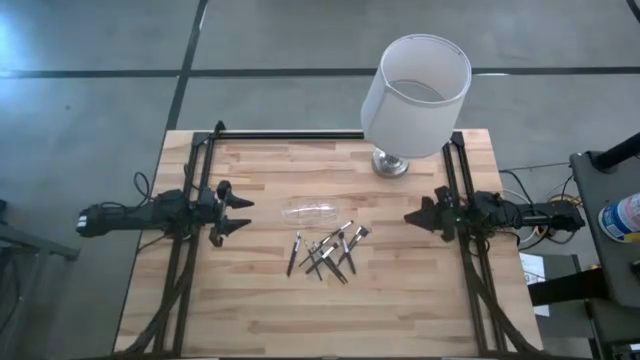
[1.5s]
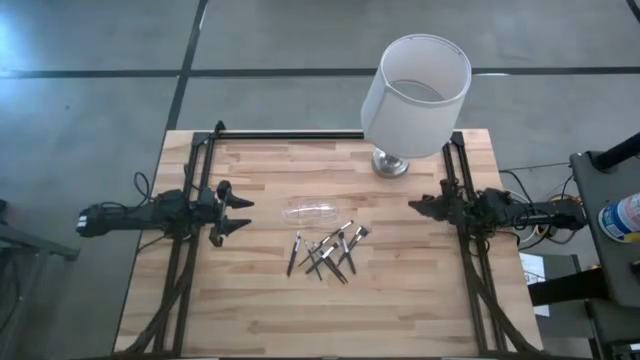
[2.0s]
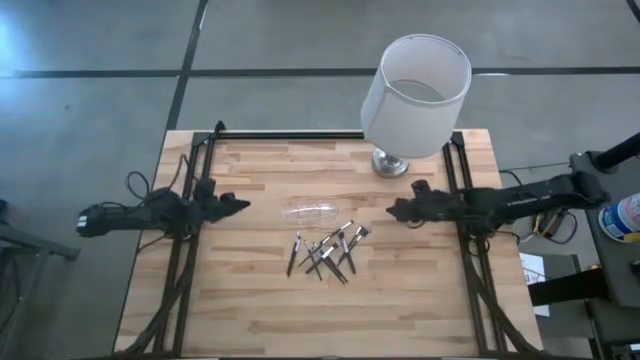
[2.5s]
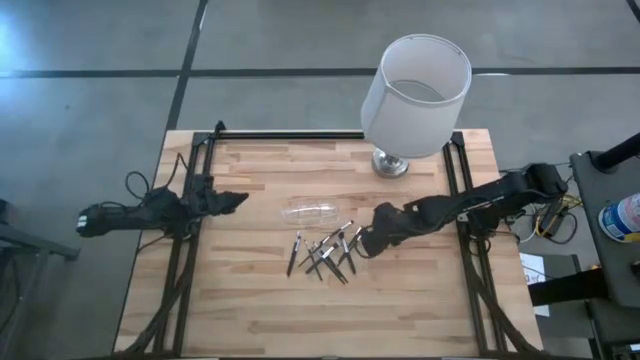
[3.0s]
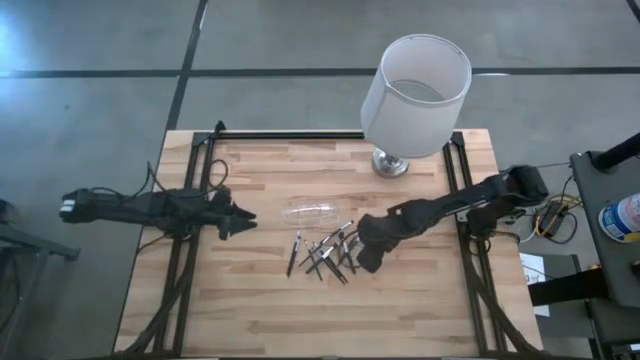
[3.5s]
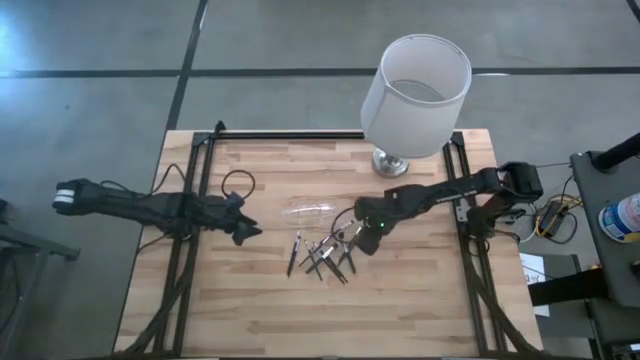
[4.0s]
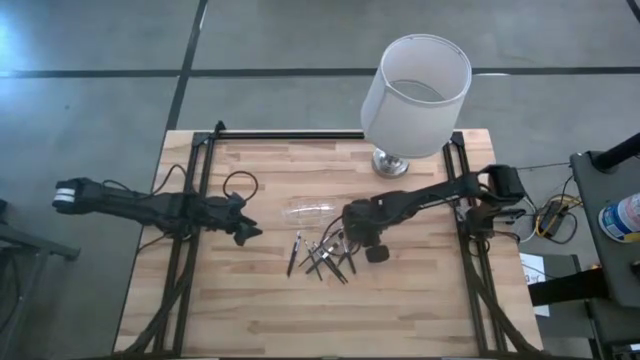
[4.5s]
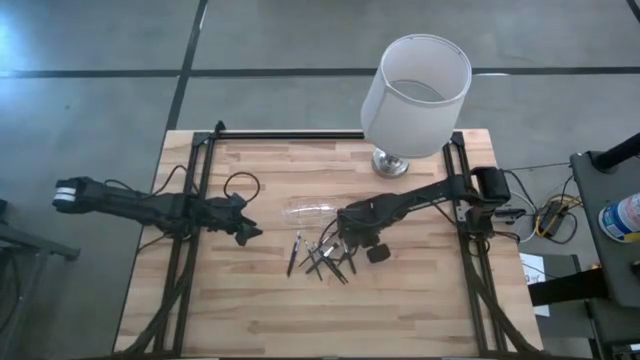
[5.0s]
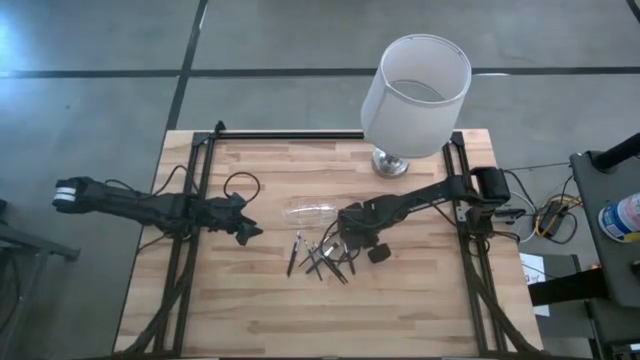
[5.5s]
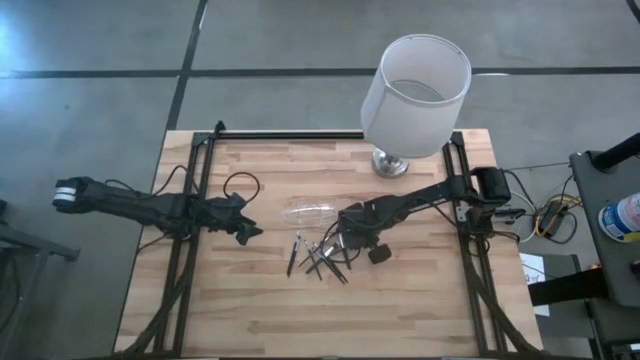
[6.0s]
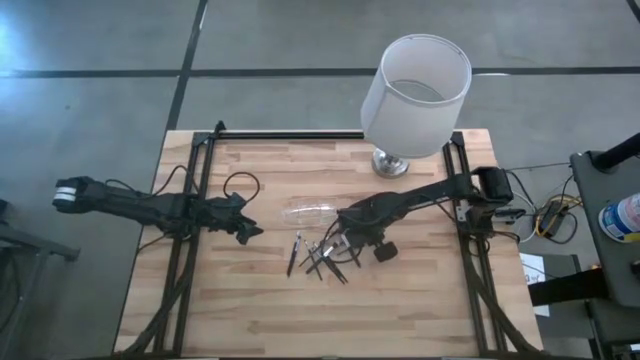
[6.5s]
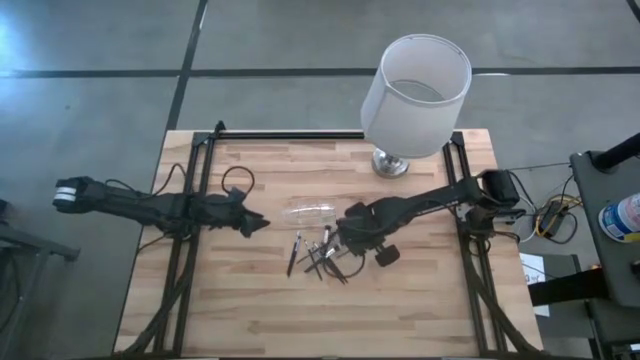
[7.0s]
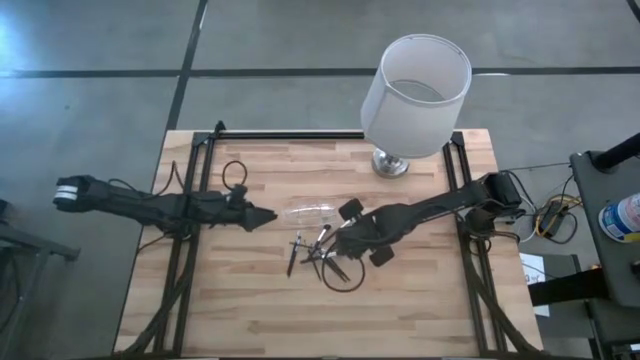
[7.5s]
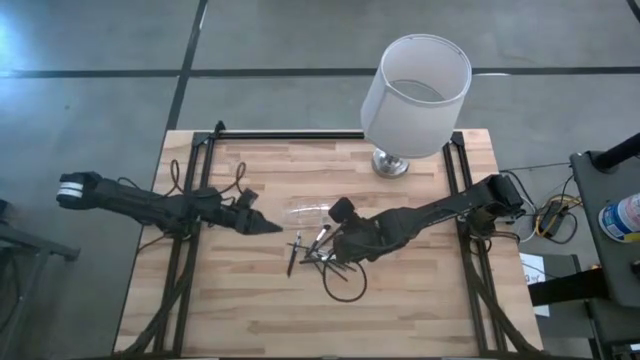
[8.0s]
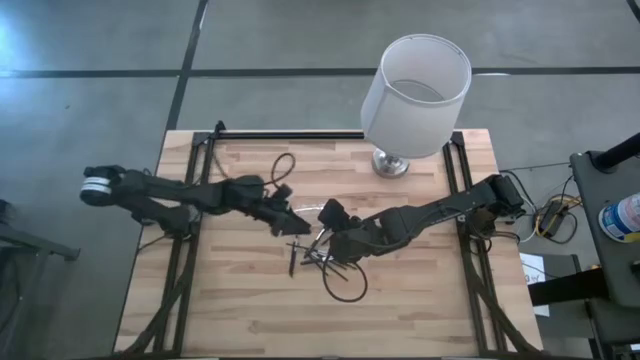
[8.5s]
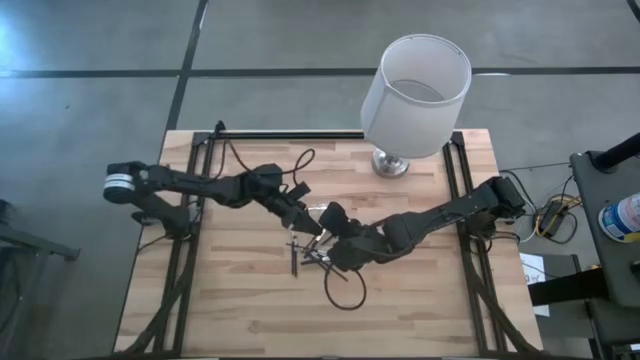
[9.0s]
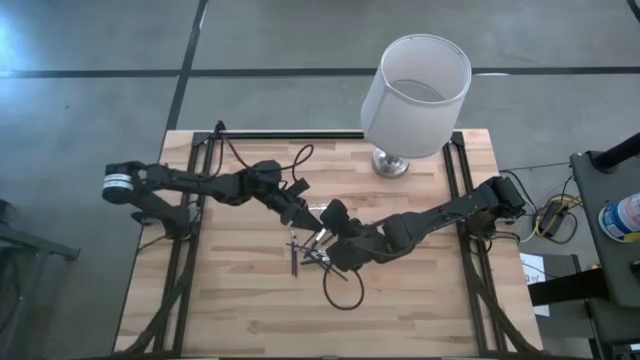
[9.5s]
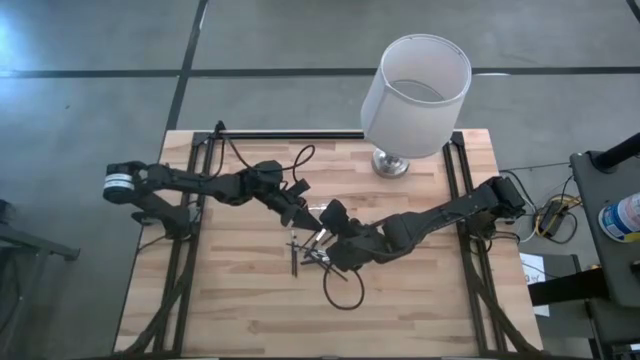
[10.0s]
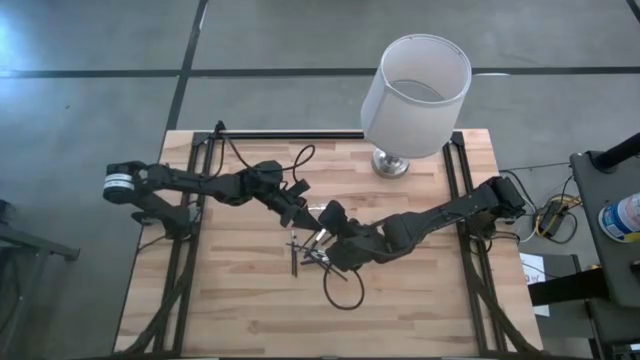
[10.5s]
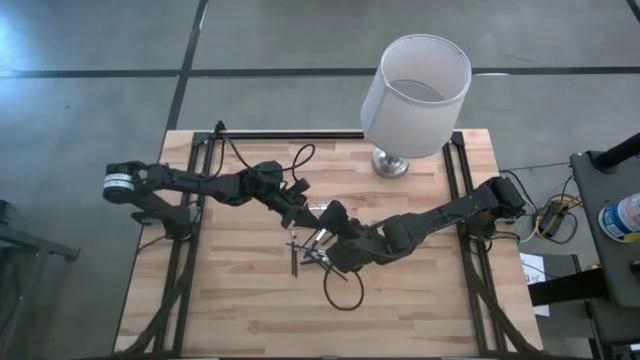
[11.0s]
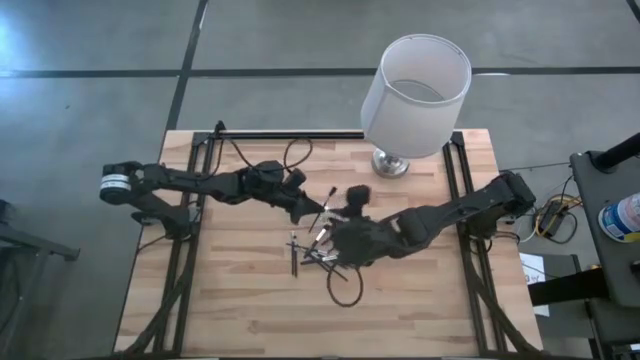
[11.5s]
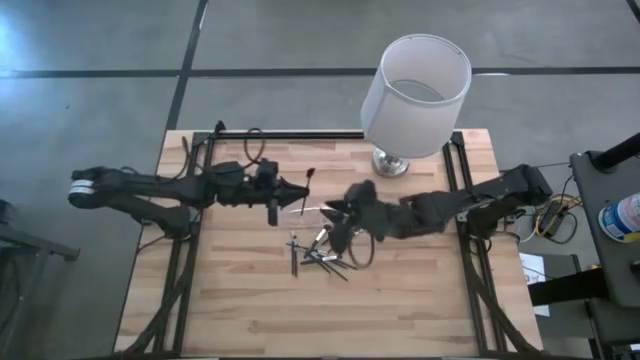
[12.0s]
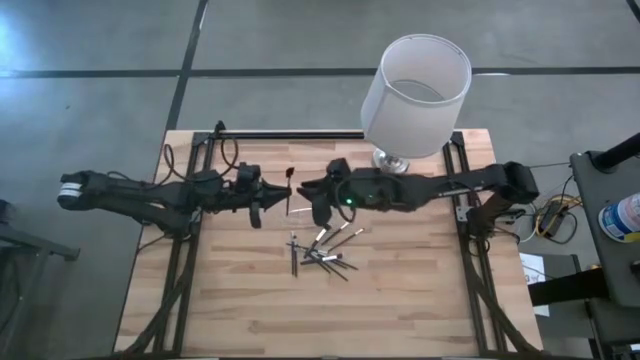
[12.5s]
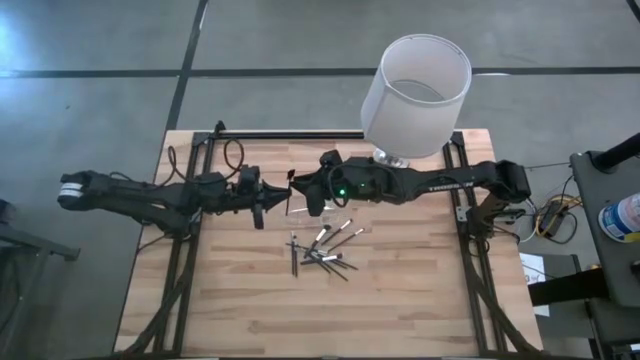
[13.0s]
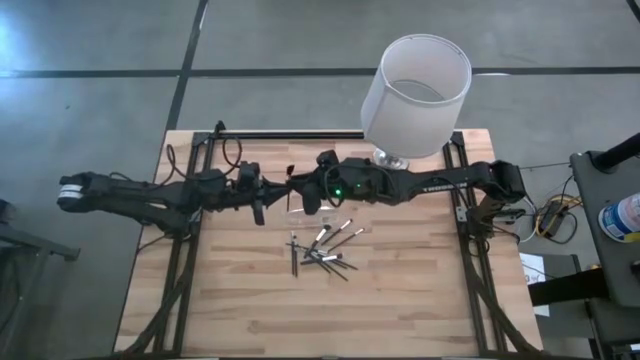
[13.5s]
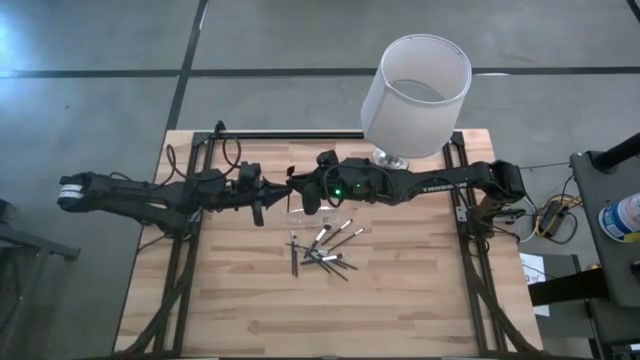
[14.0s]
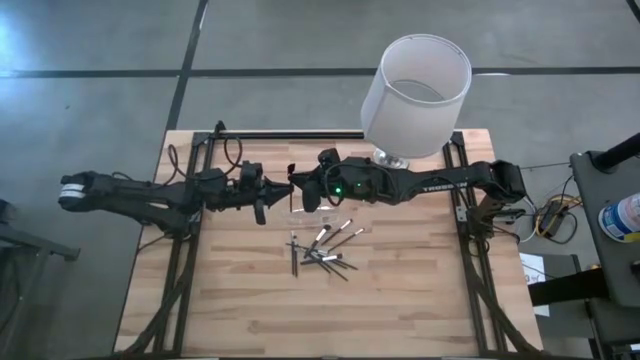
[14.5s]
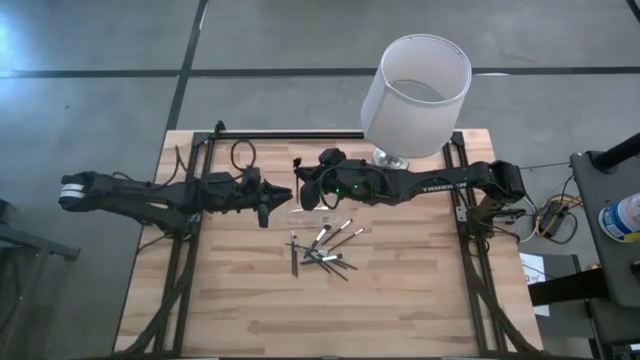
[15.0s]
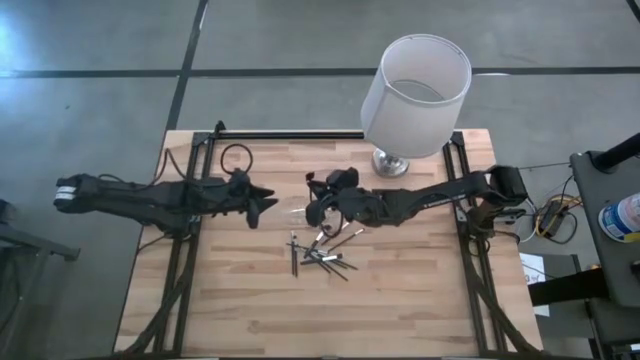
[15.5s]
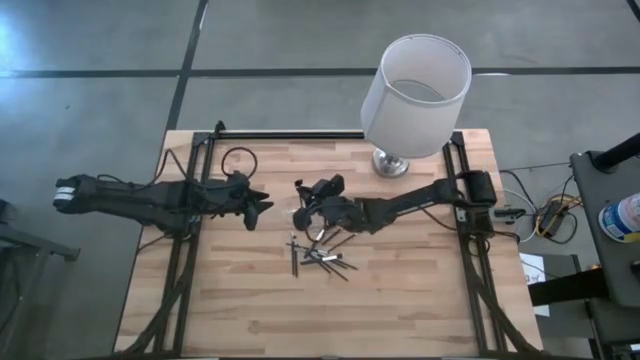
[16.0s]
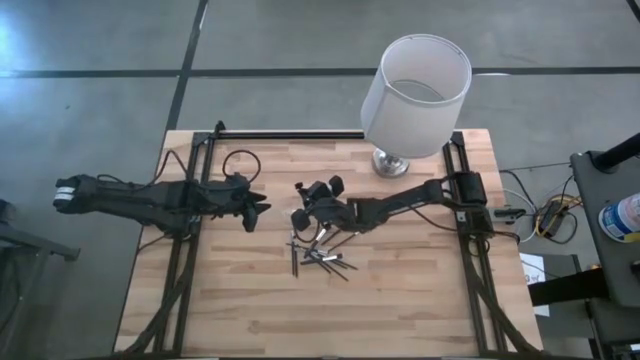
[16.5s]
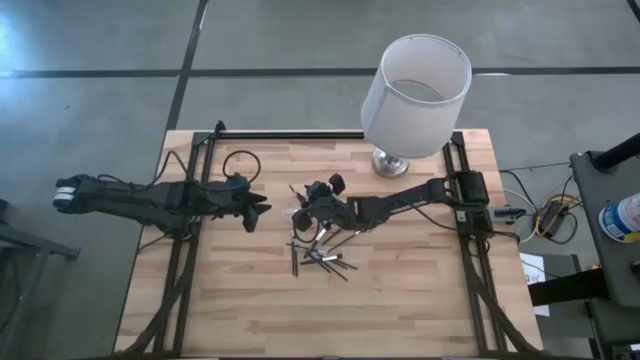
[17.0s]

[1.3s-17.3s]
Task: Put items in baskets/containers
Put the brow brush into the transparent organizer

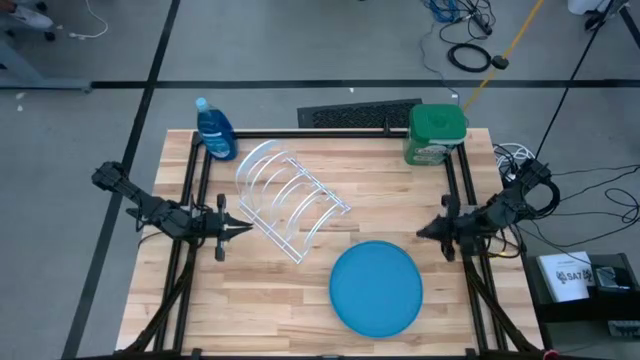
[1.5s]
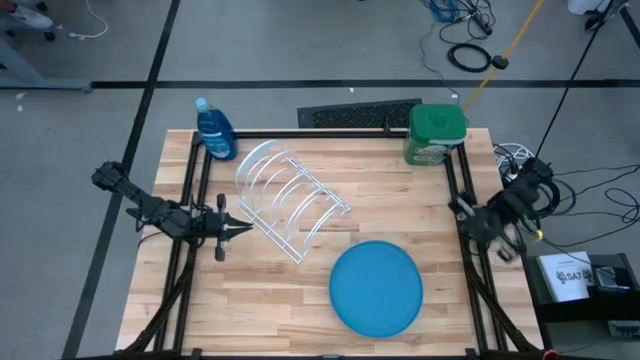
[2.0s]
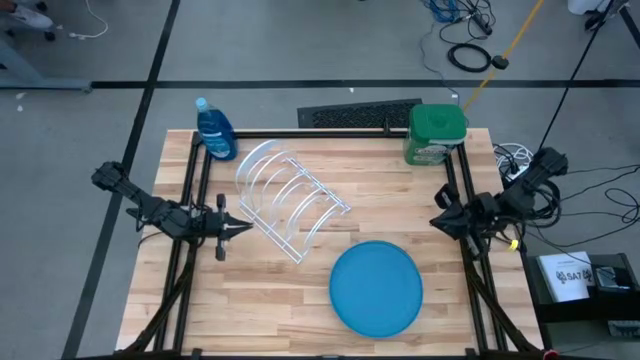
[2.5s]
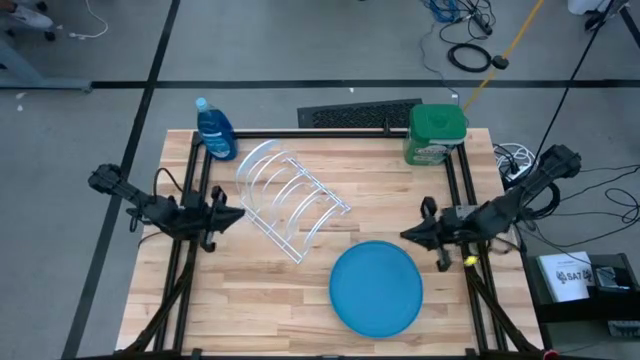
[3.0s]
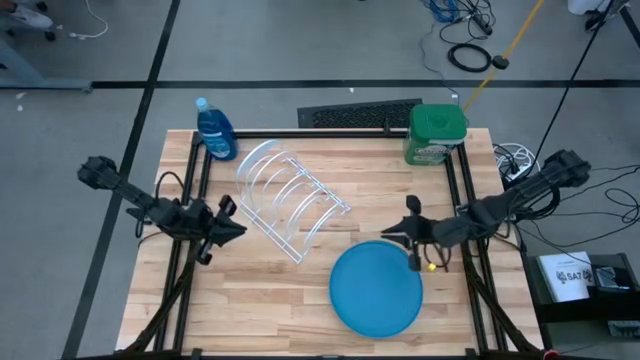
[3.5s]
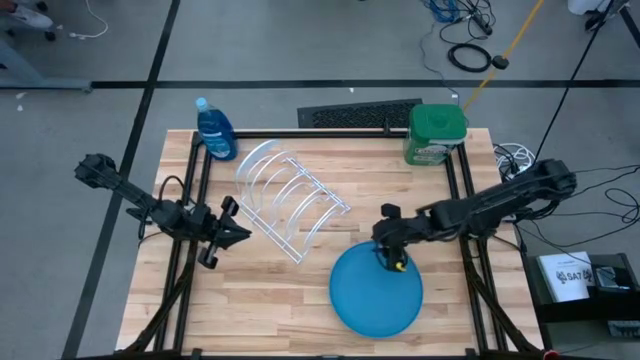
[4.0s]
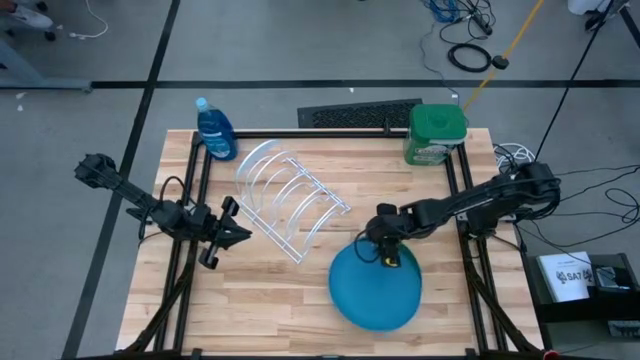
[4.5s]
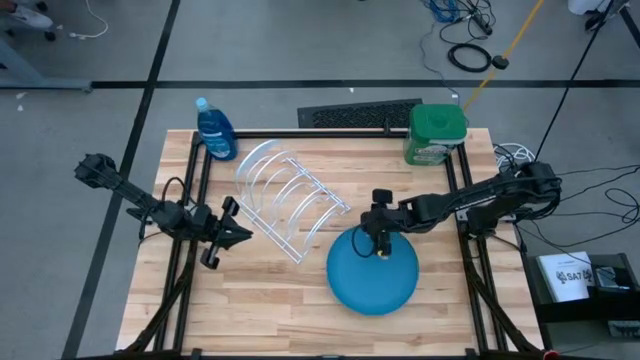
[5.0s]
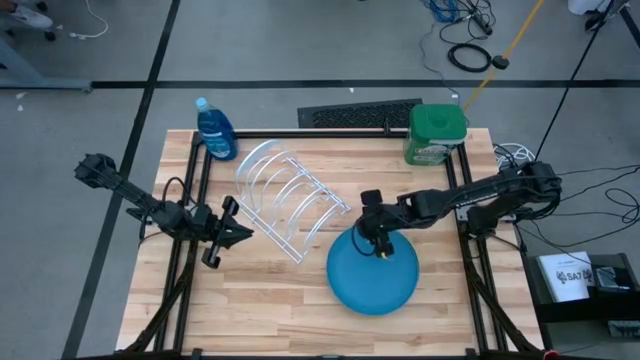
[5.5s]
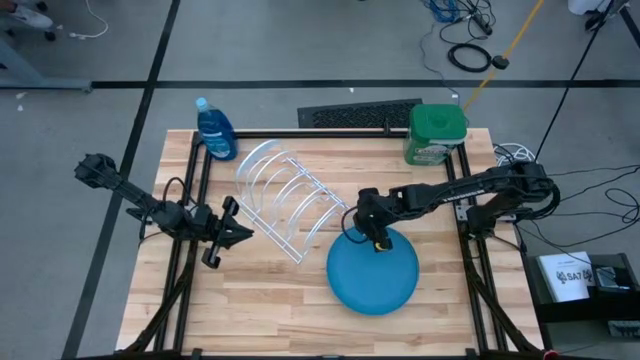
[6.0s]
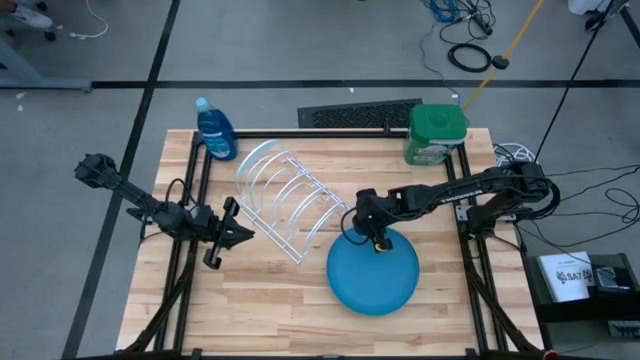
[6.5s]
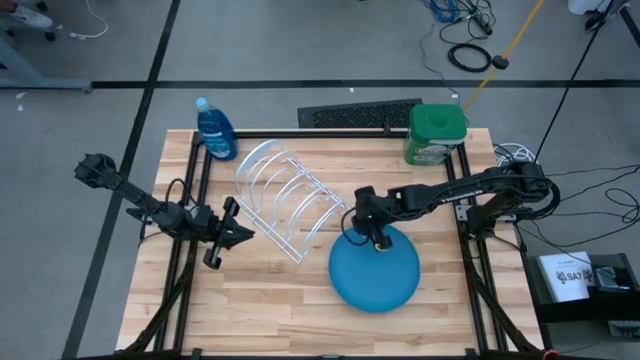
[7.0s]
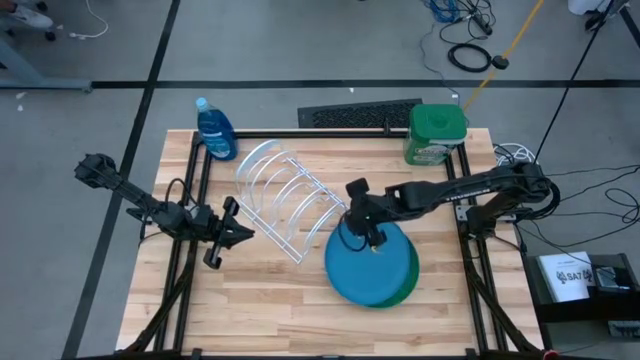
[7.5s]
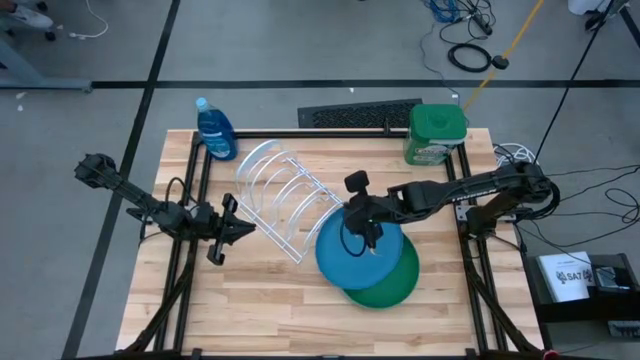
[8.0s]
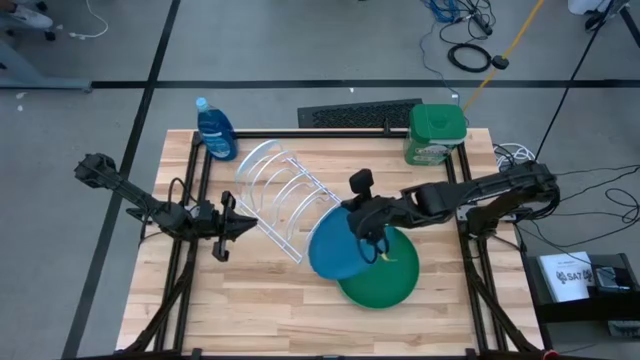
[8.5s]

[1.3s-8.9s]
Task: Sort dishes
Put the blue plate on the dish rack
